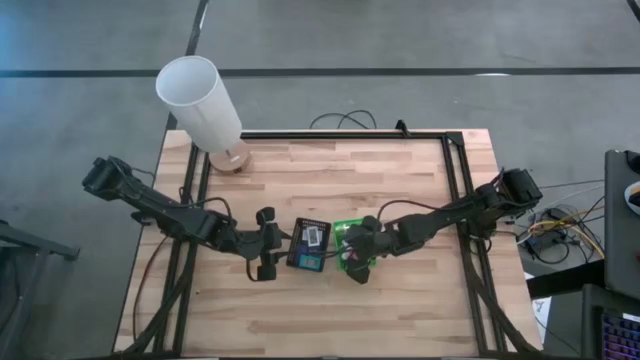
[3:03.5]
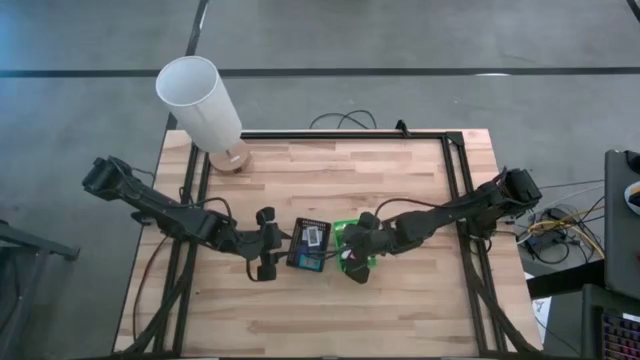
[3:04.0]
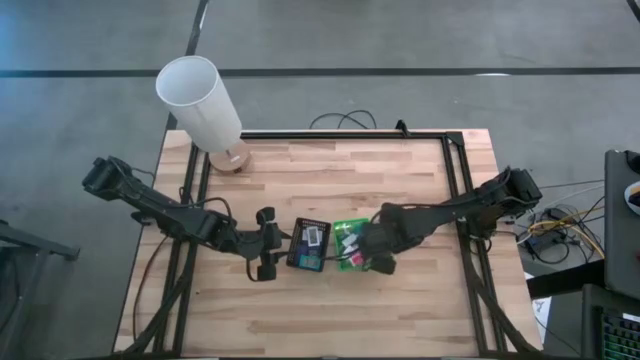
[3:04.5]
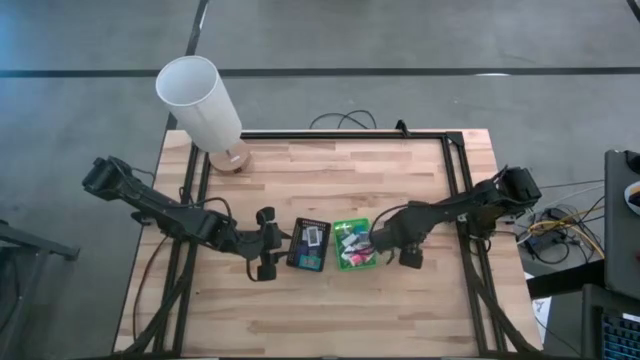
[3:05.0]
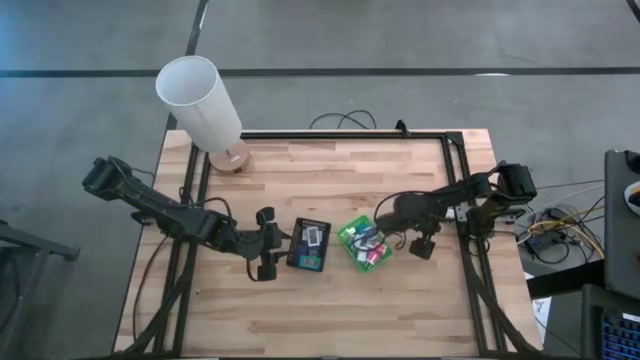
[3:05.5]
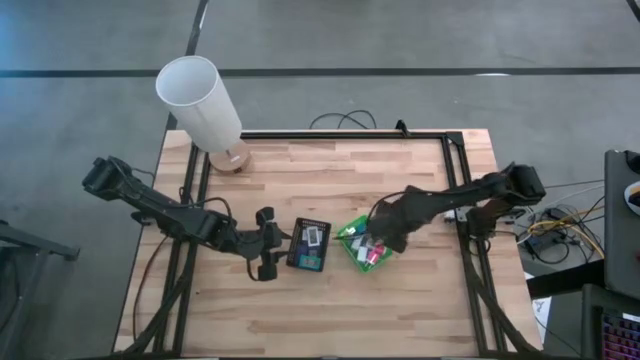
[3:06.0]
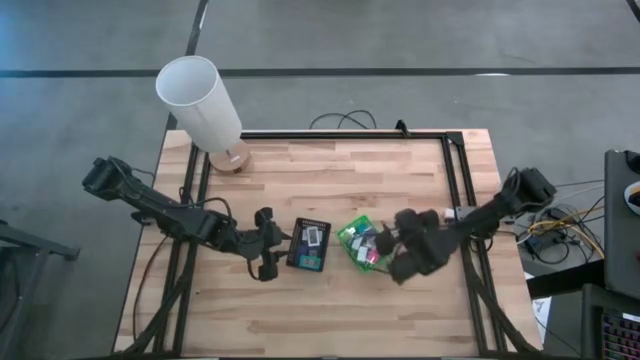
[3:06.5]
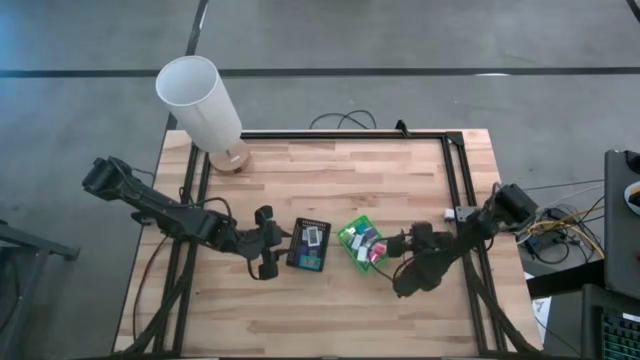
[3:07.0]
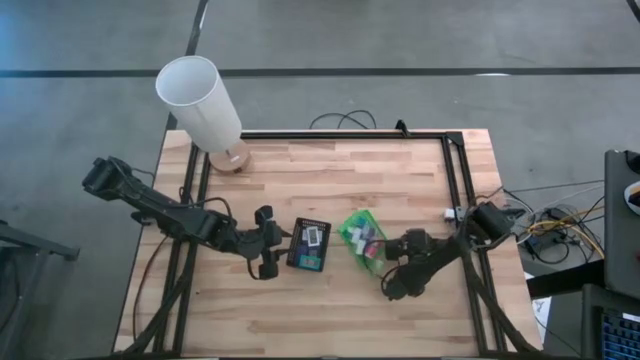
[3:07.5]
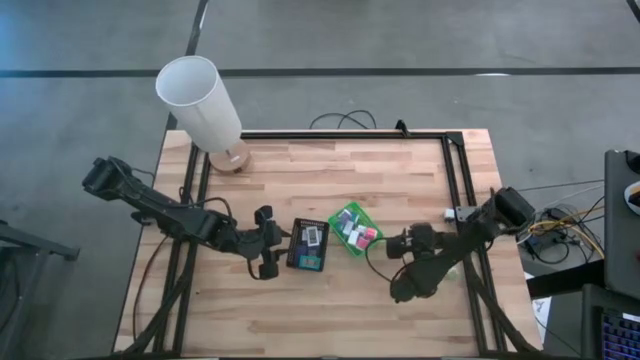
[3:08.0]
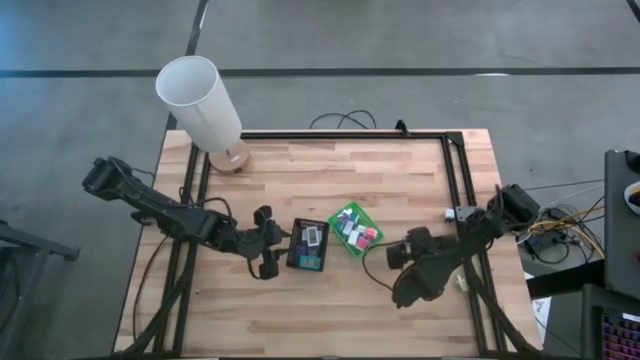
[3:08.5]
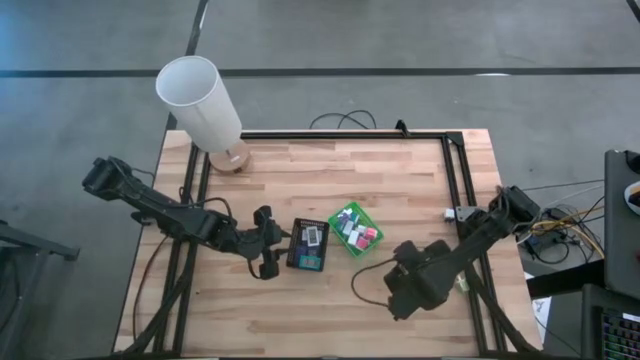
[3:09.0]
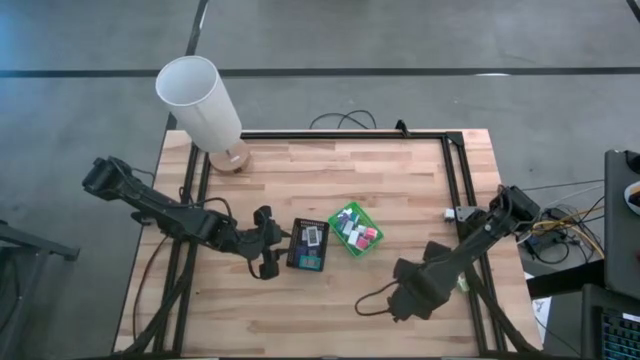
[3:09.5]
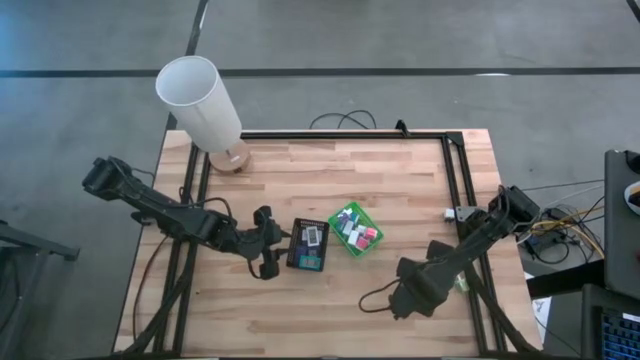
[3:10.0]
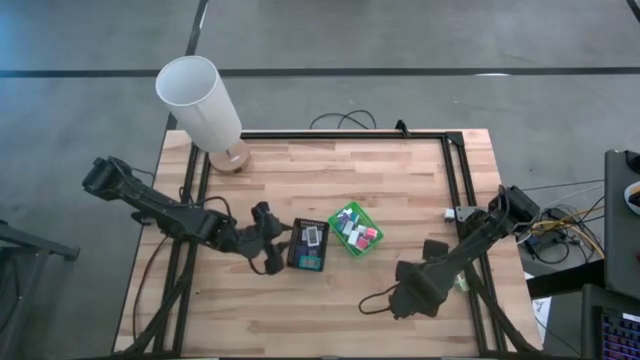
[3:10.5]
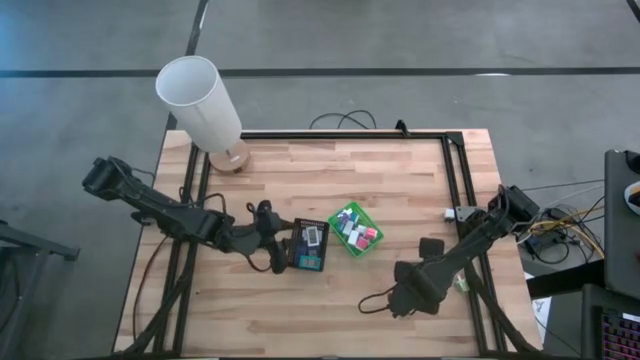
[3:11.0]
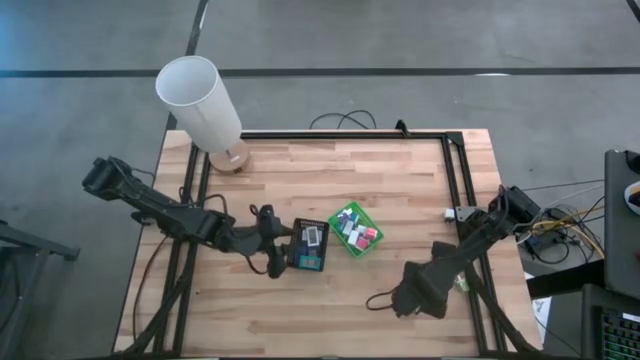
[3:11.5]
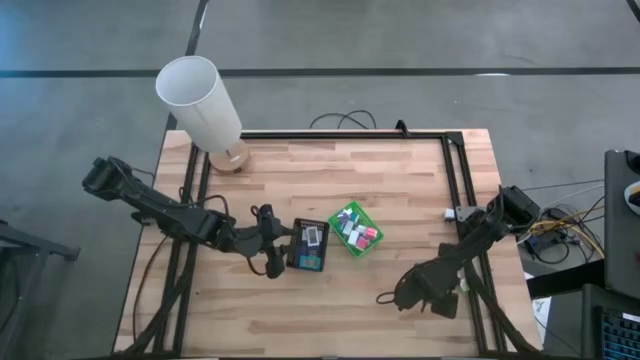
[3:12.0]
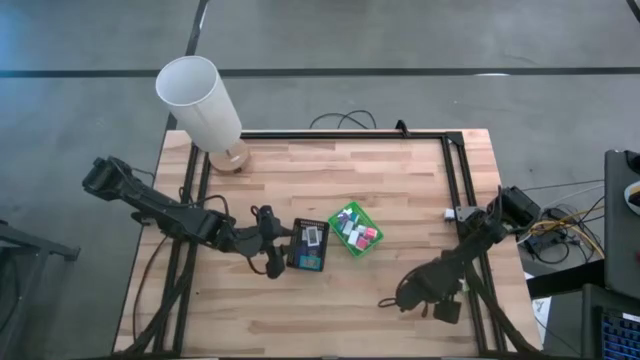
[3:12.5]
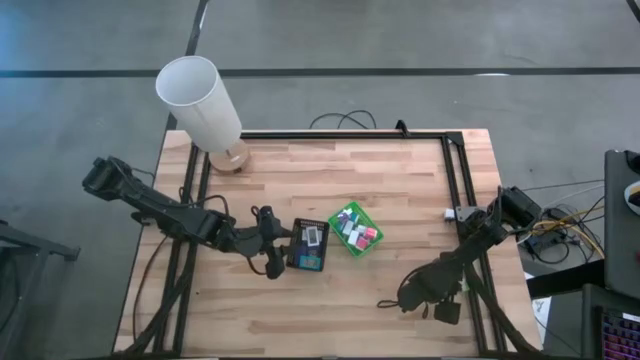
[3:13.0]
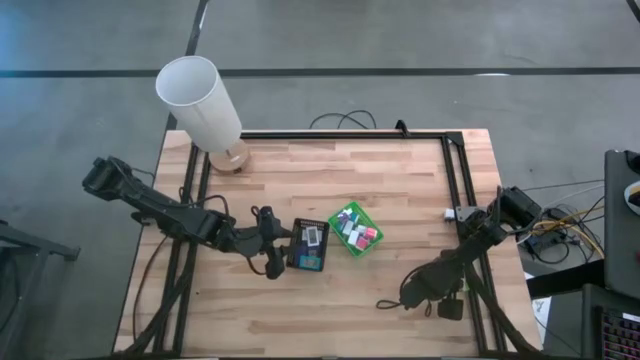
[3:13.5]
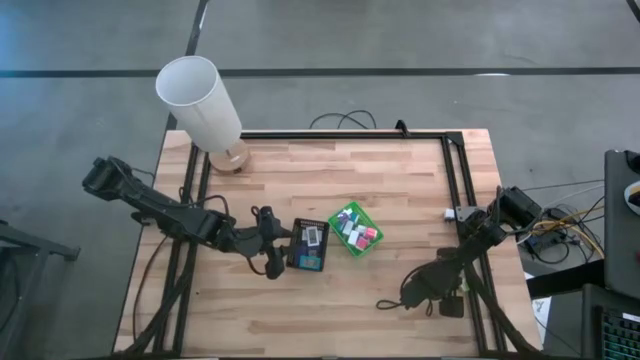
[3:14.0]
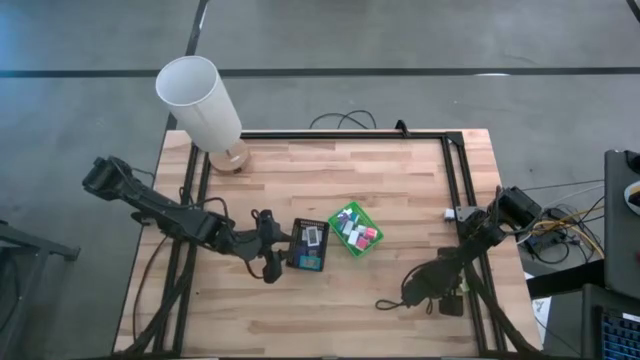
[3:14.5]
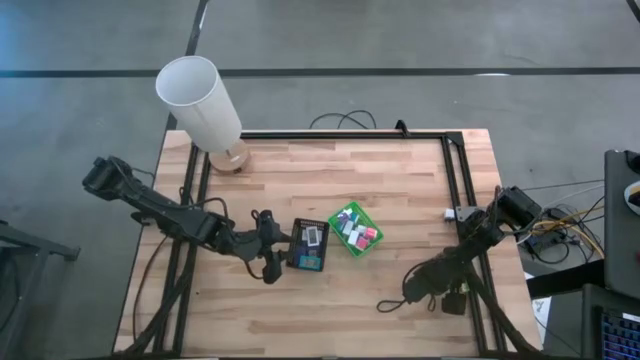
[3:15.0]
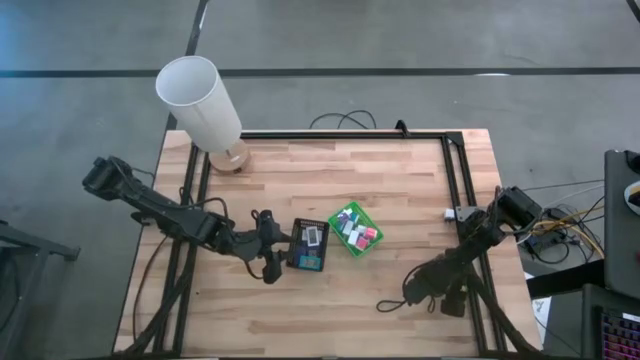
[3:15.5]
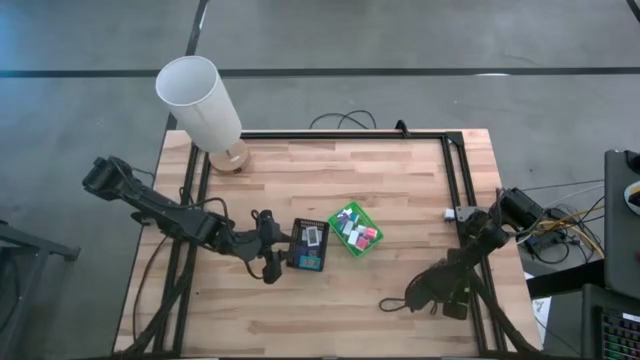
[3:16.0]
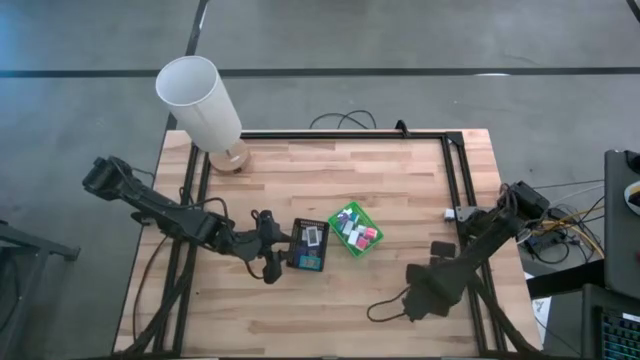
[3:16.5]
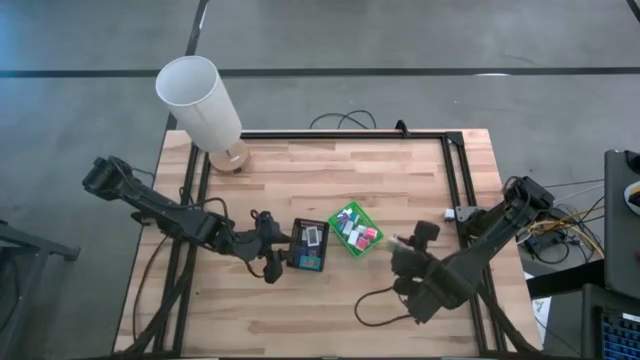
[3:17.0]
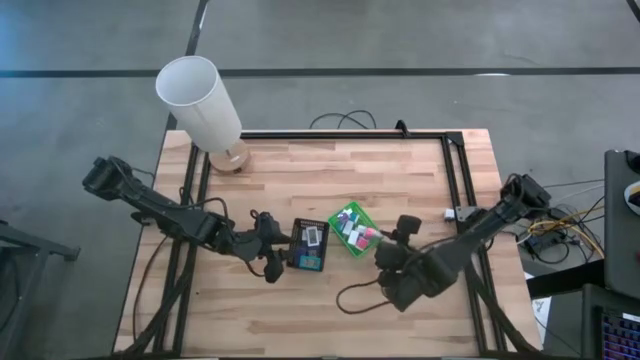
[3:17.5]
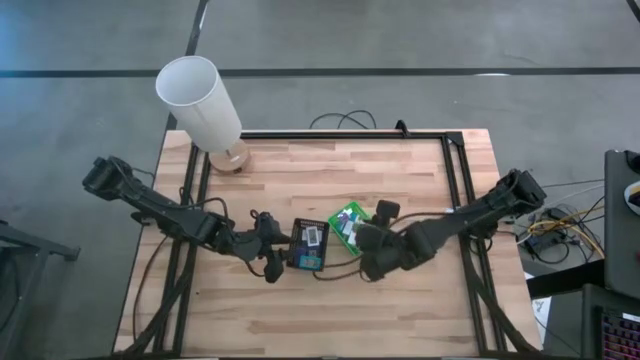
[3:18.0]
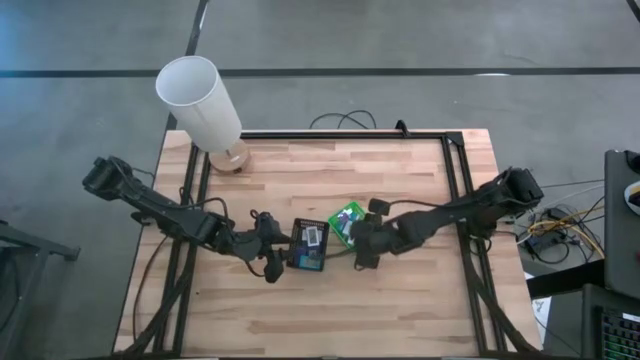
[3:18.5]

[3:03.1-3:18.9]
Task: Pick & Place Office items
Put the green charger adapter into the green basket

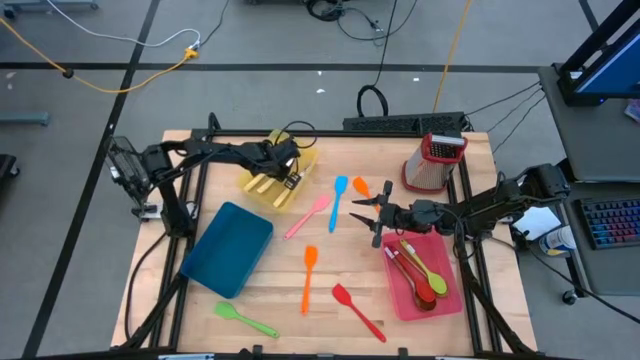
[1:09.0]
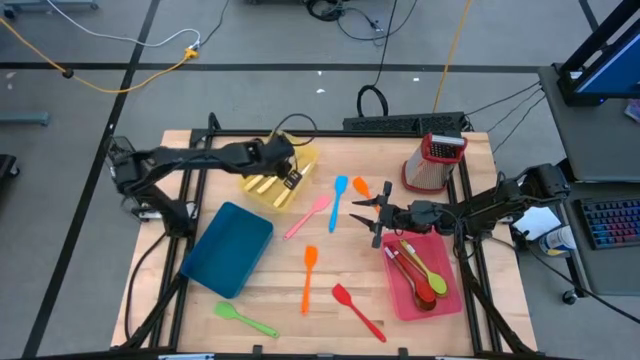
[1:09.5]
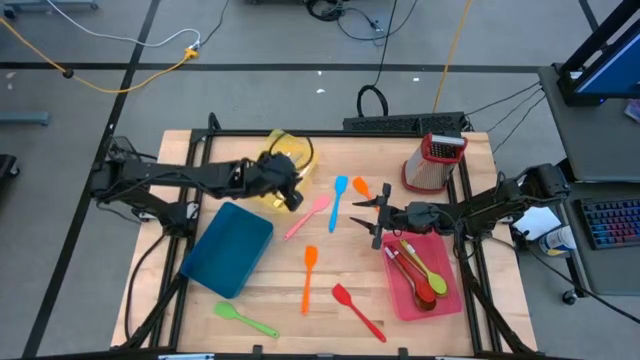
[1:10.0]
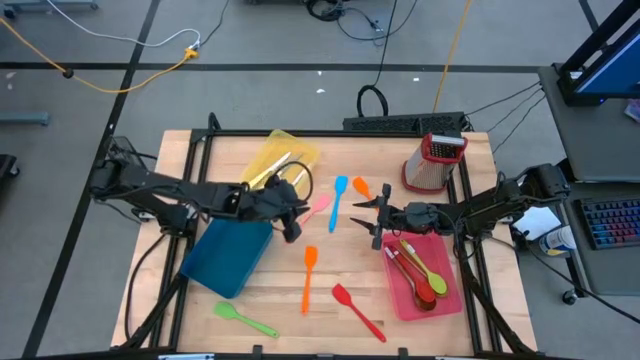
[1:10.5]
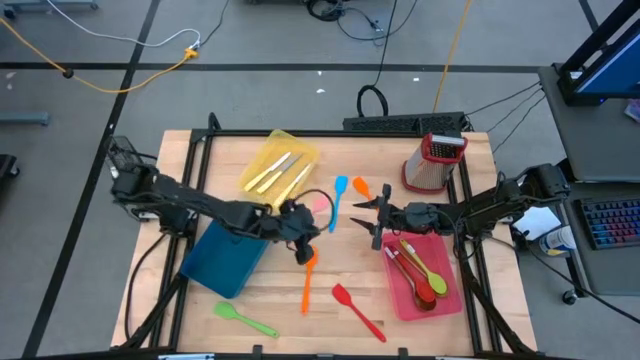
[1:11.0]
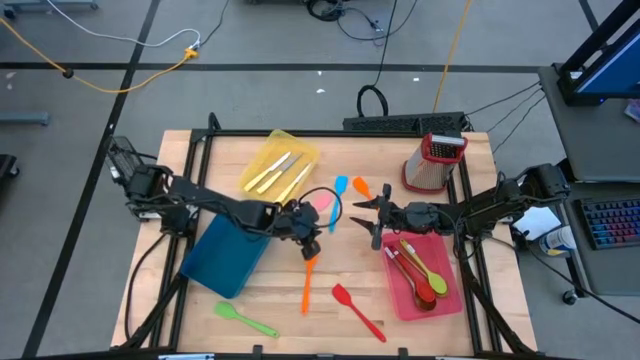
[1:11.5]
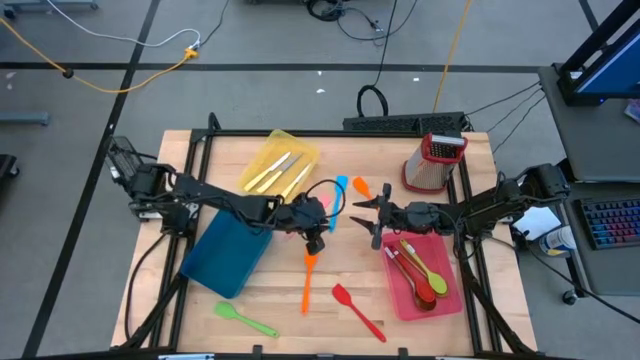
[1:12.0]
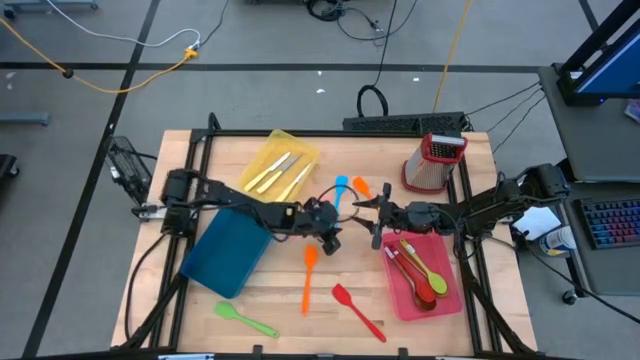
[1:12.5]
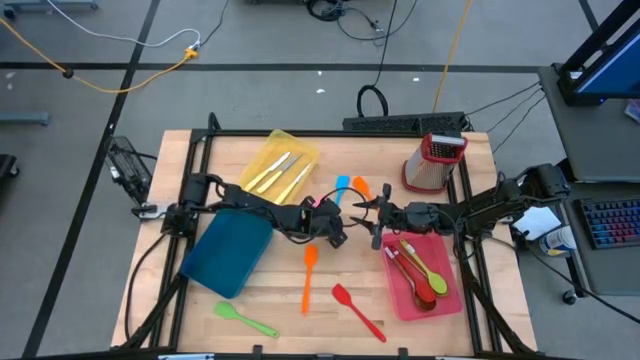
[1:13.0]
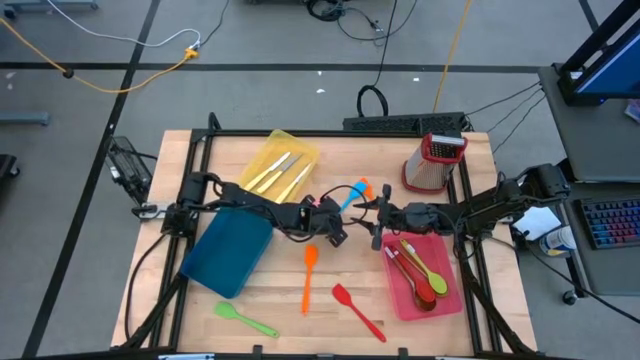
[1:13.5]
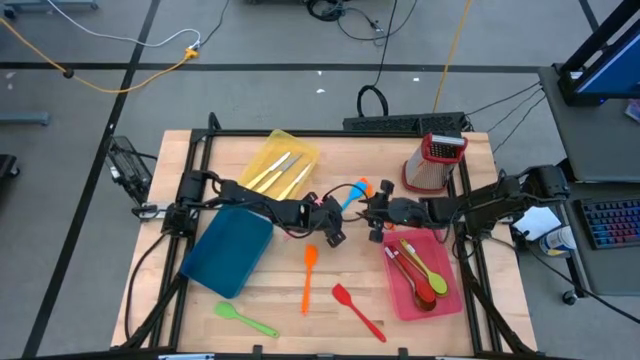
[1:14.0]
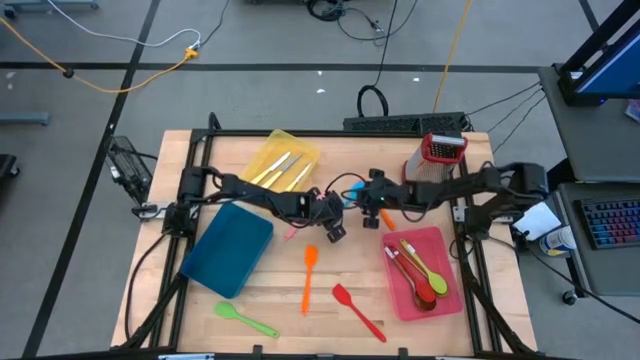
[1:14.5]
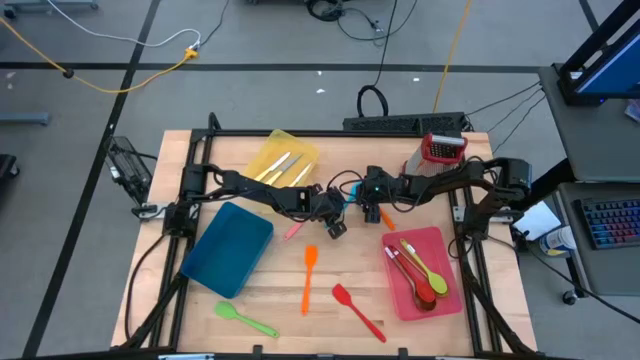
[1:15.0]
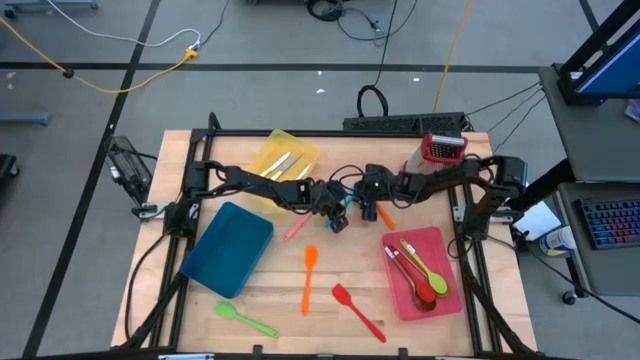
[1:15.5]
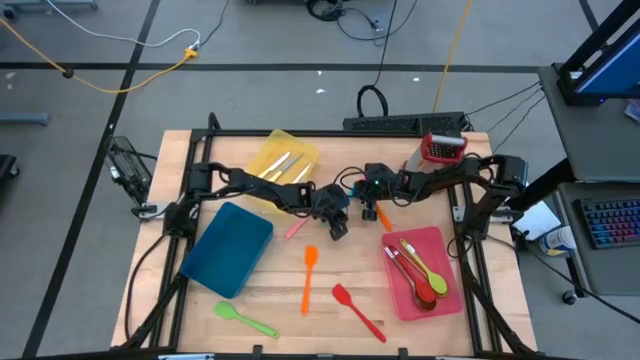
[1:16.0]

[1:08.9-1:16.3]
Task: Pick & Place Kitchen Items
Put the blue spatula into the blue bin
